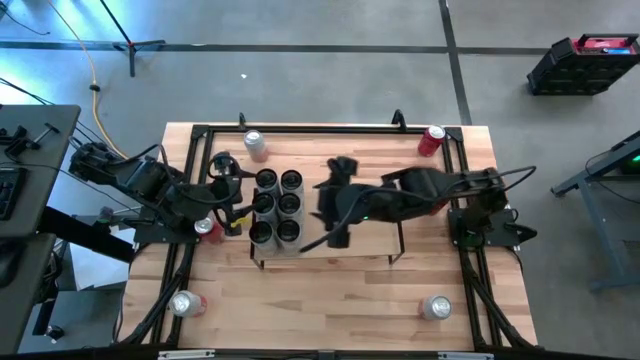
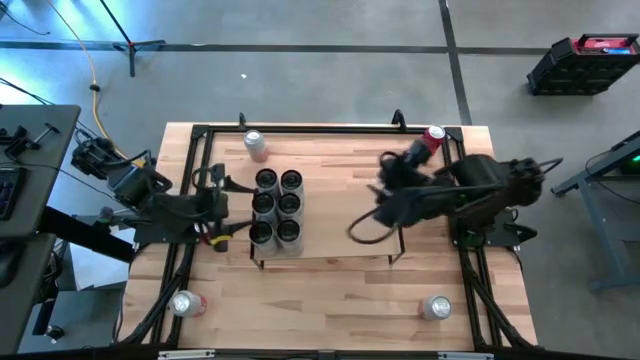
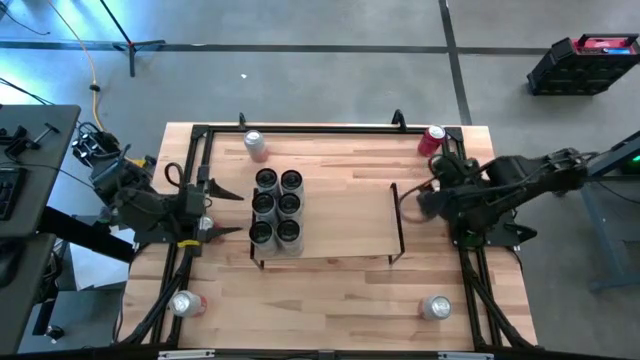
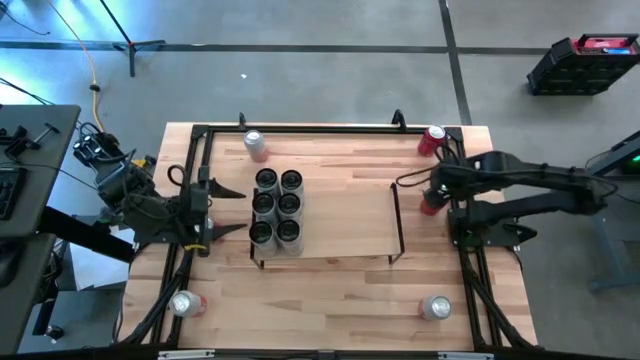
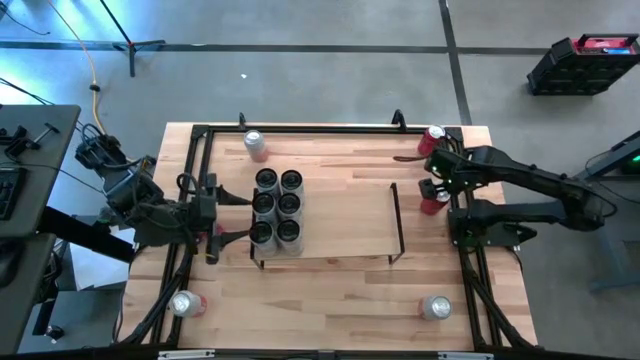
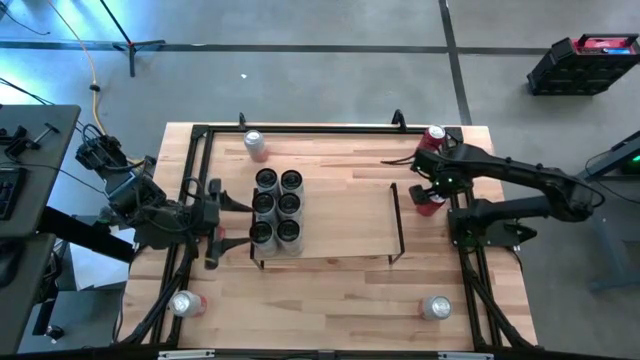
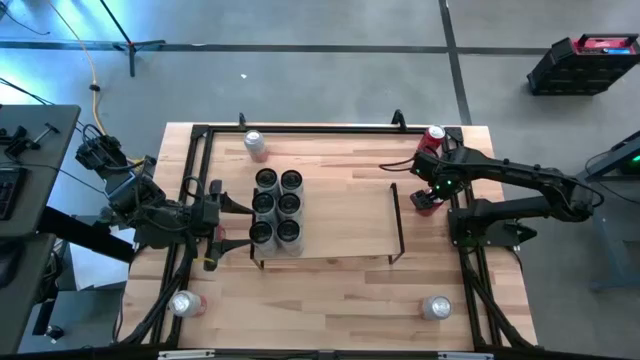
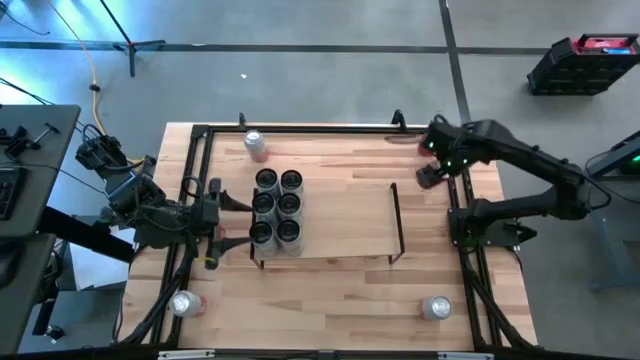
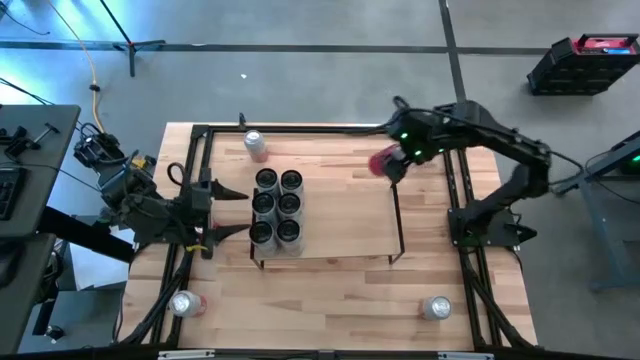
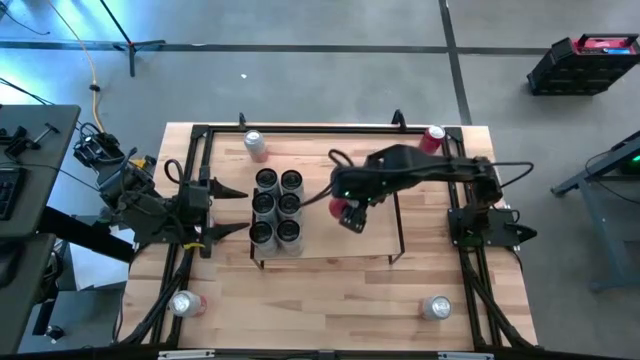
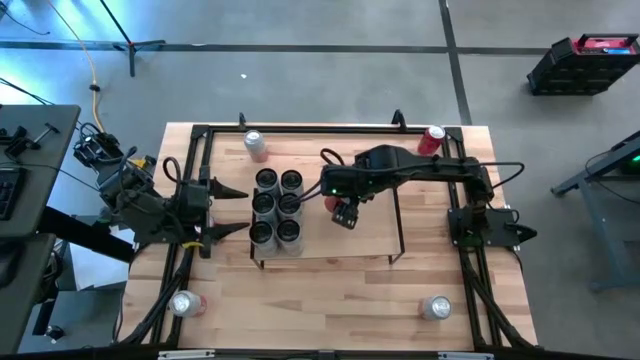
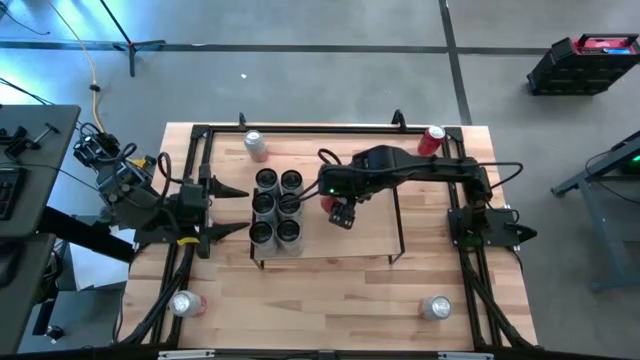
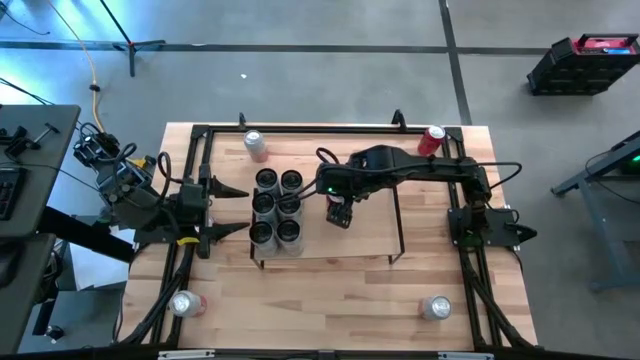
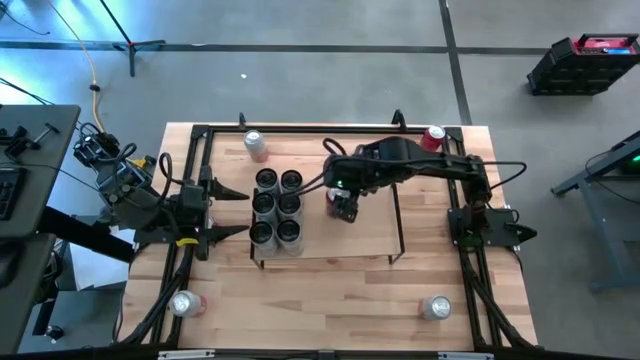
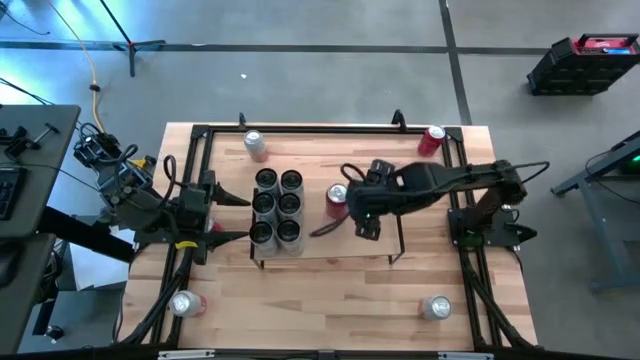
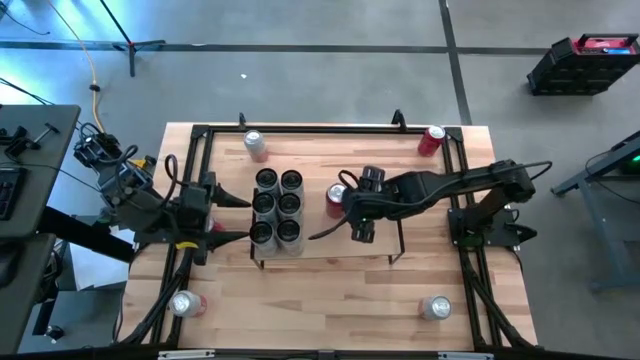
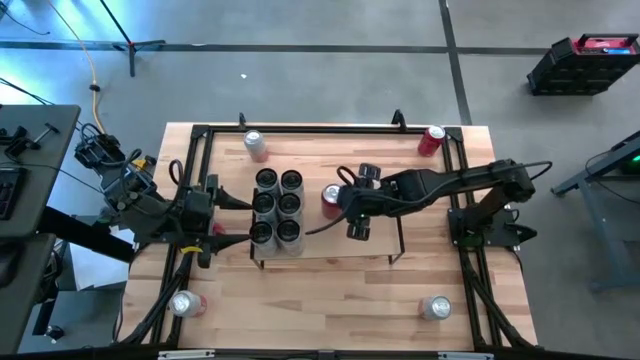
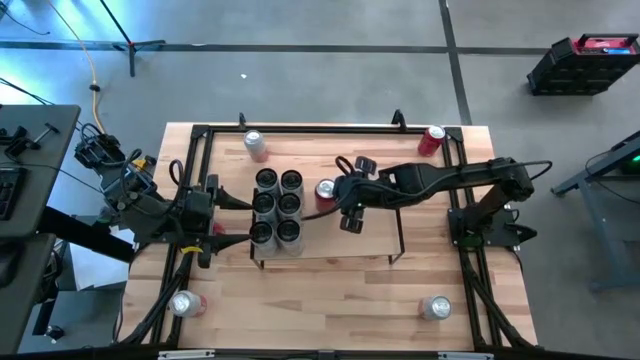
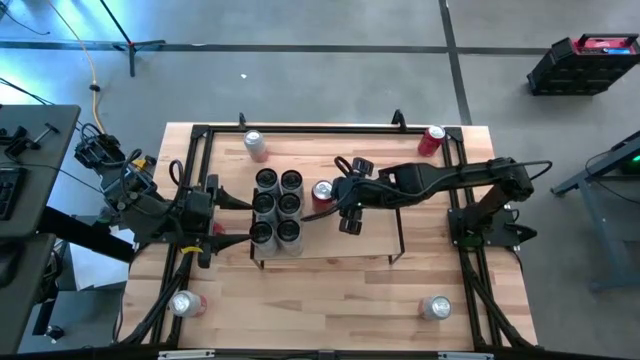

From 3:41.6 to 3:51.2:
Task: Place canned beverage on shelf
Put the bottom right red soda can on the shelf

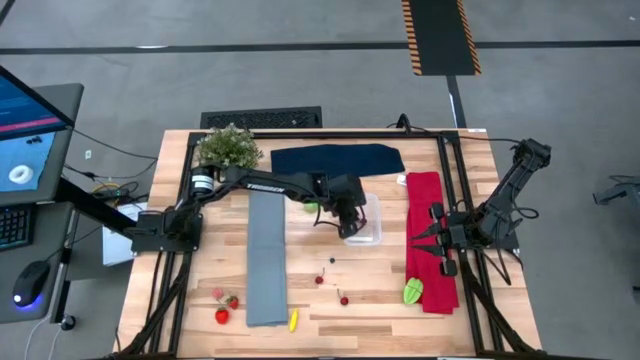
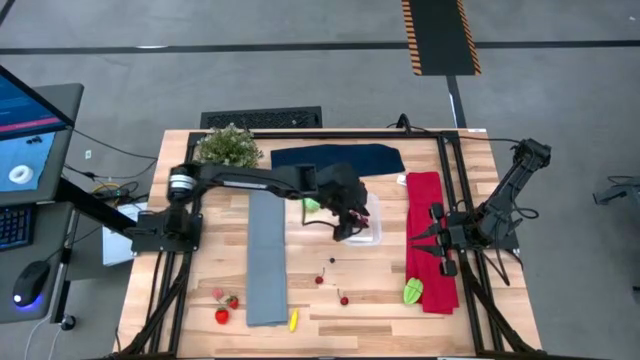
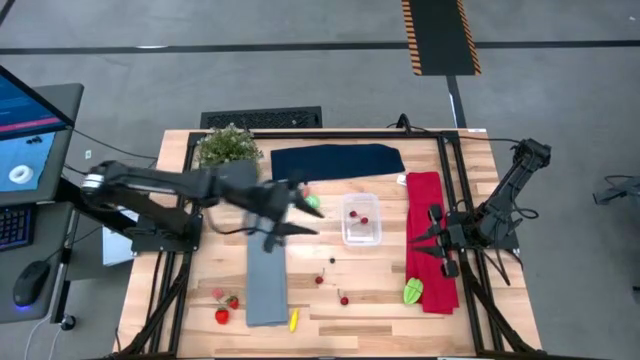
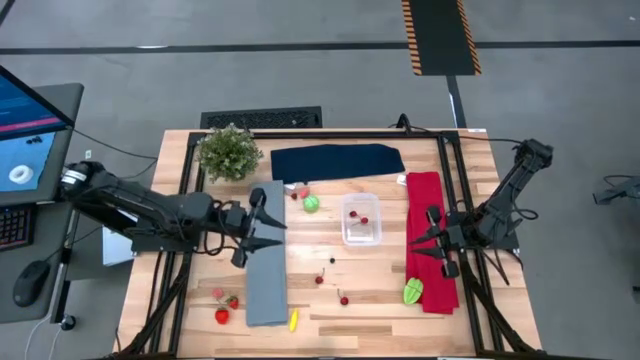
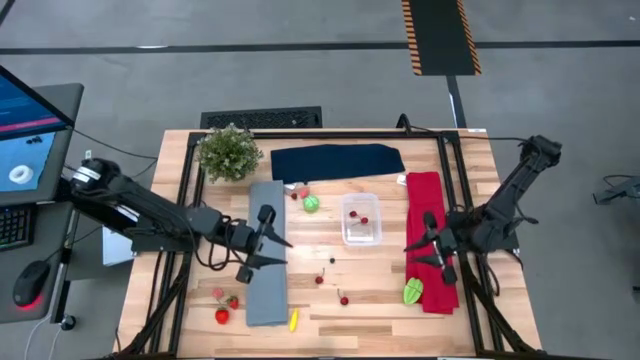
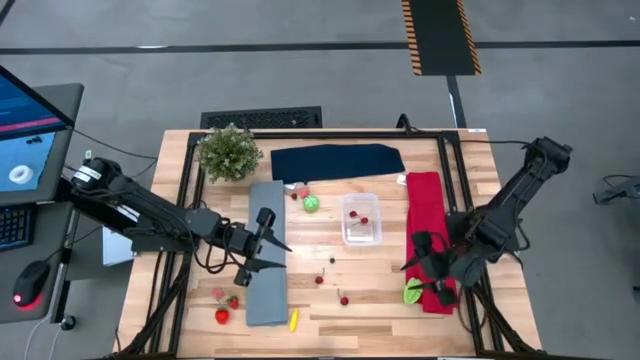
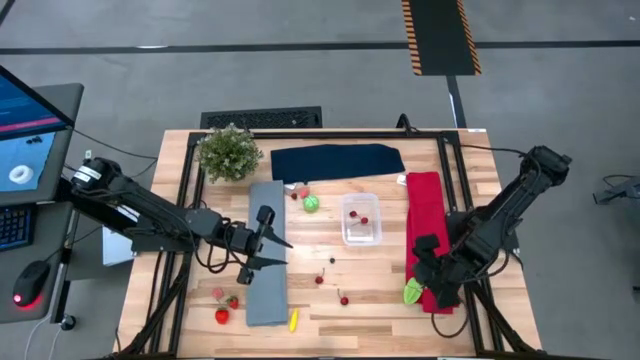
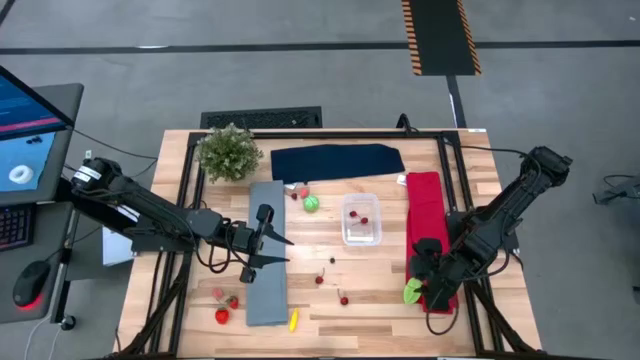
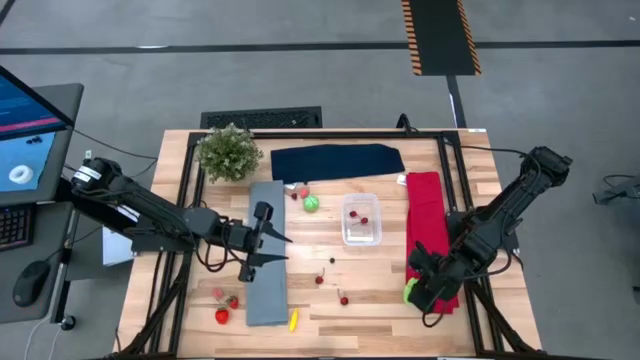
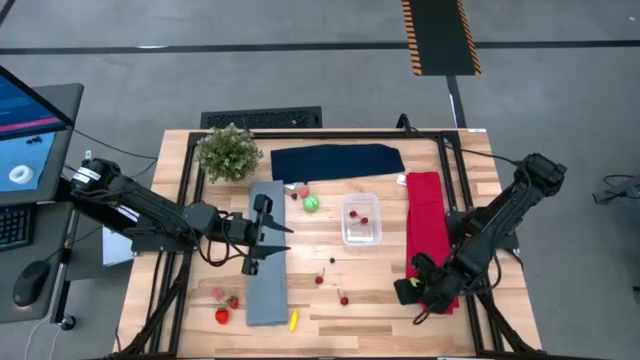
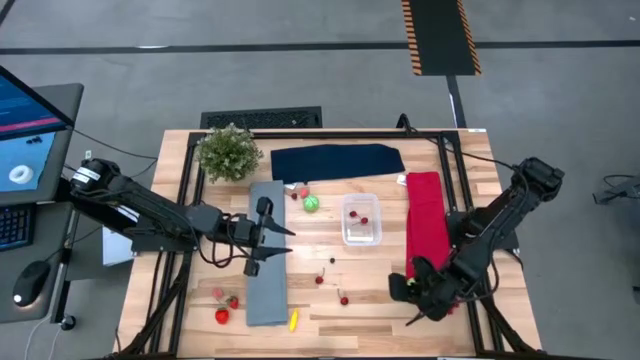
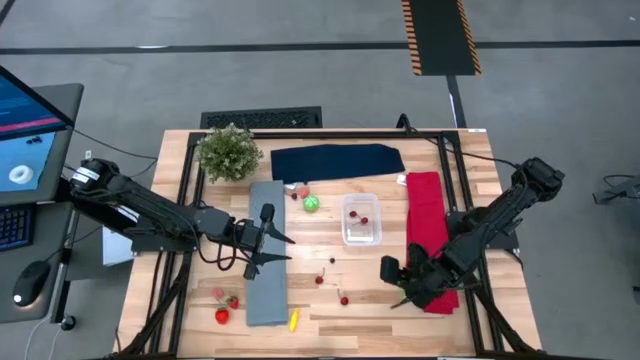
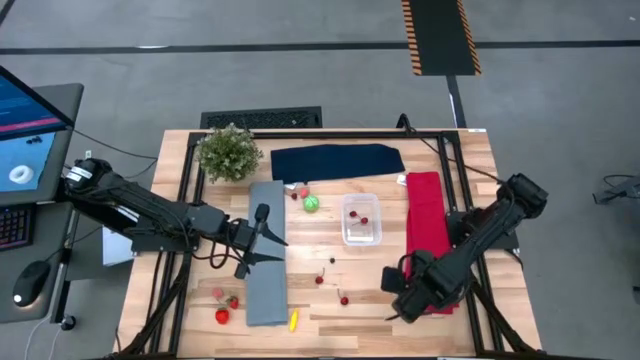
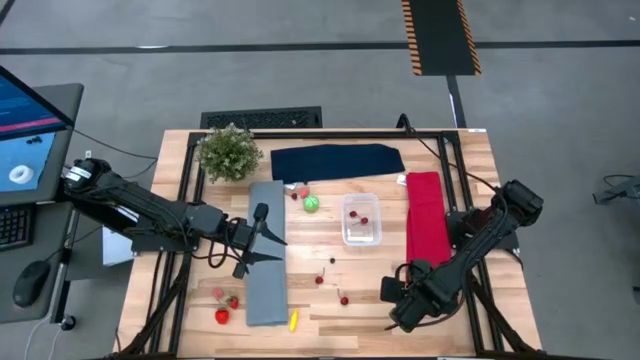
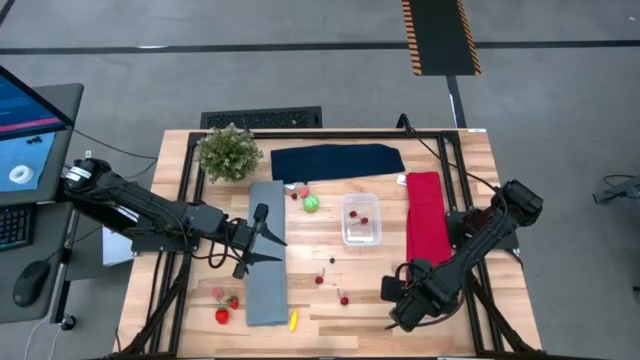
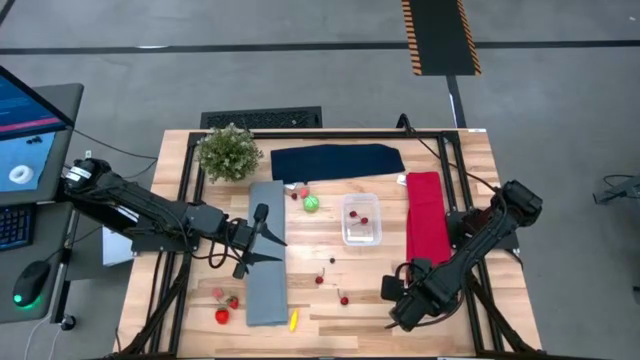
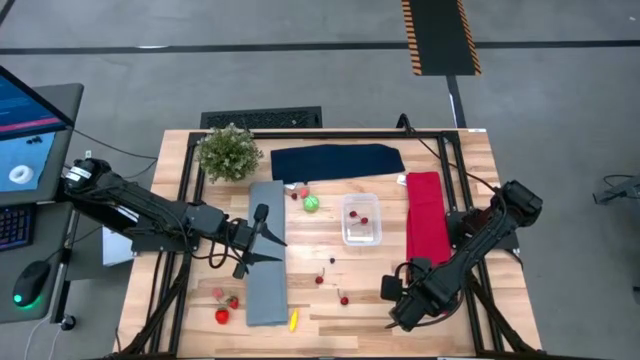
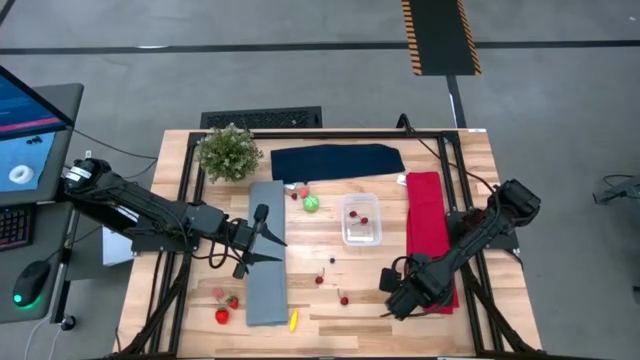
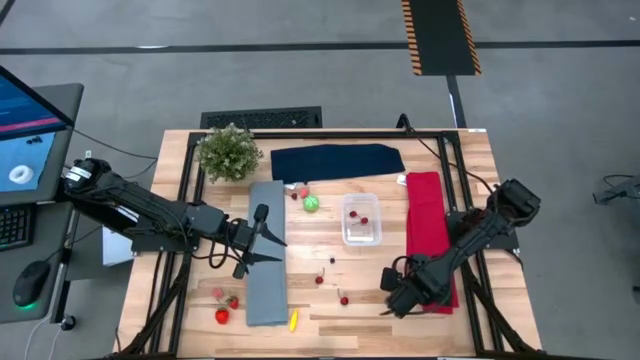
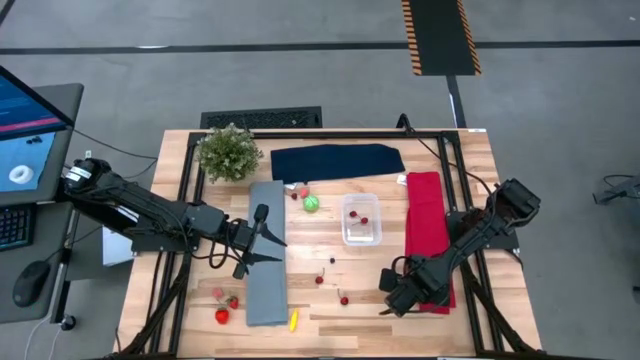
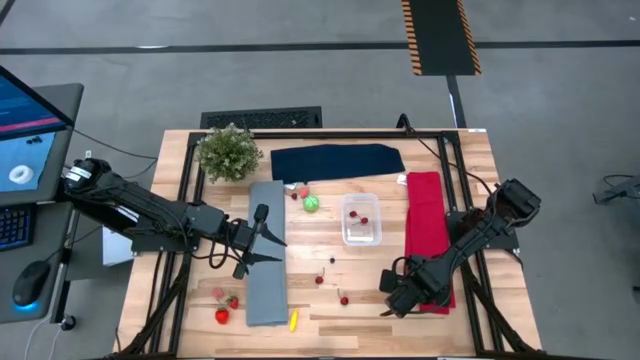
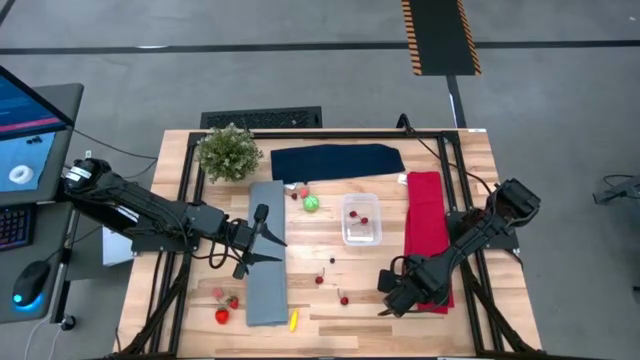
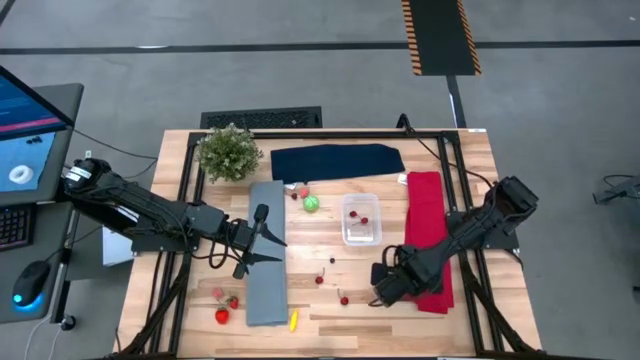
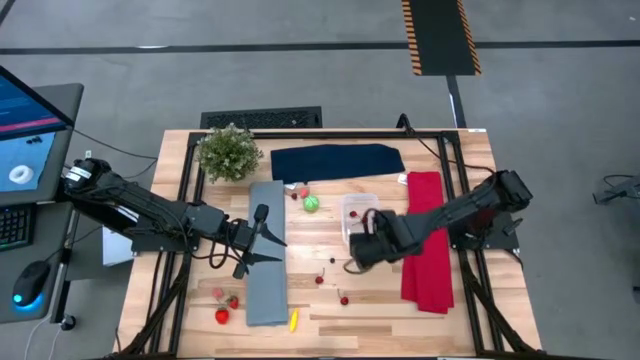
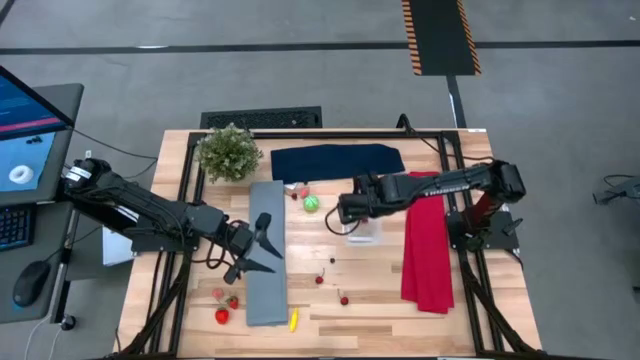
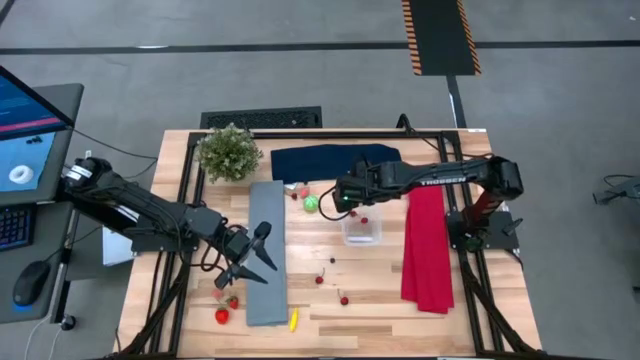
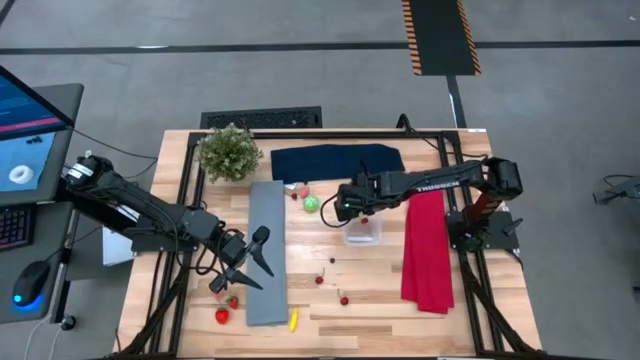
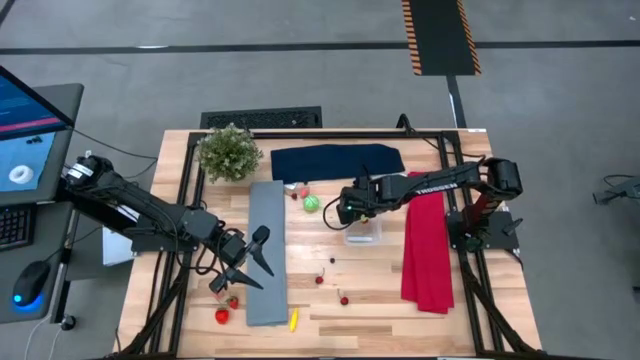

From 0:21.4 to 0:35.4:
Task: Pick and placing Produce into tupperware
Put the green starfruit into the transparent bin
